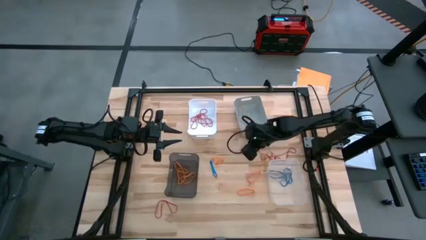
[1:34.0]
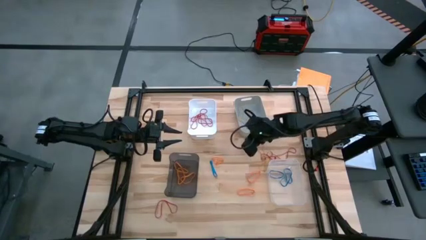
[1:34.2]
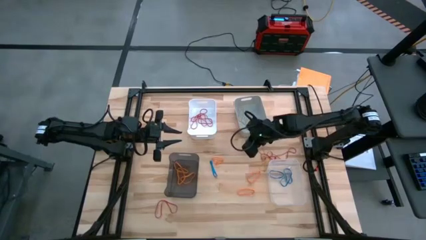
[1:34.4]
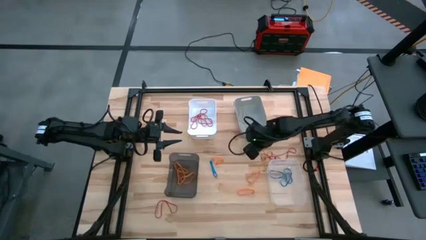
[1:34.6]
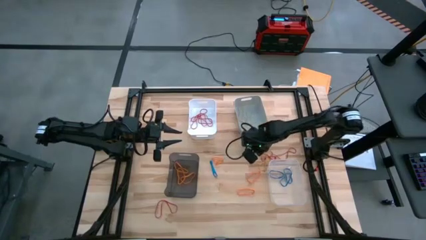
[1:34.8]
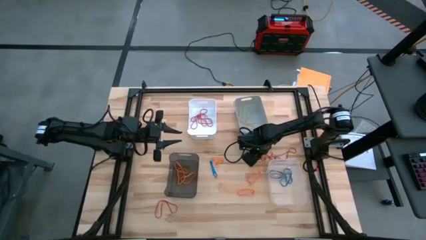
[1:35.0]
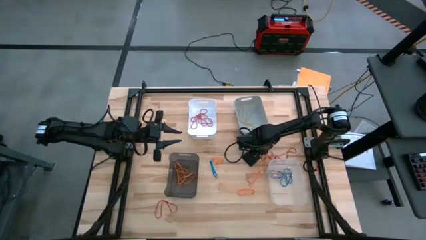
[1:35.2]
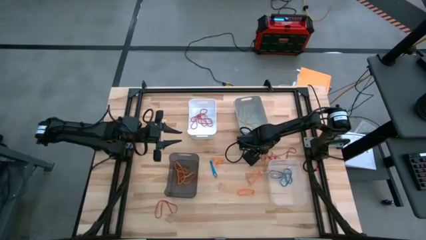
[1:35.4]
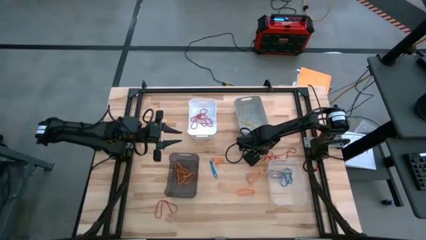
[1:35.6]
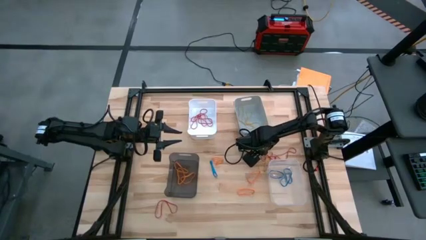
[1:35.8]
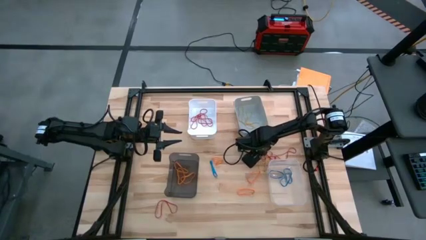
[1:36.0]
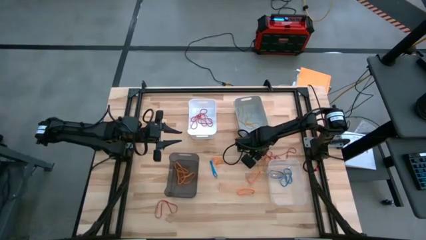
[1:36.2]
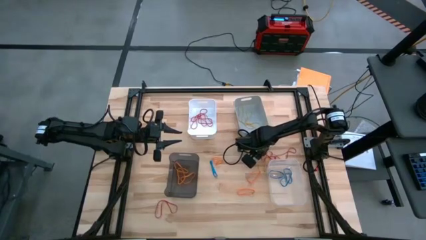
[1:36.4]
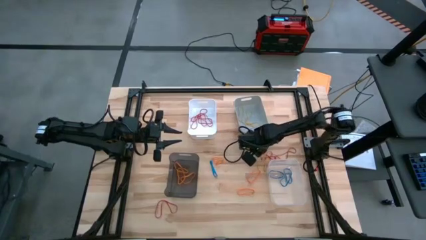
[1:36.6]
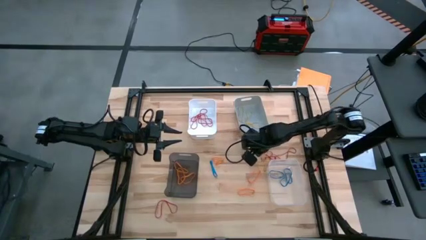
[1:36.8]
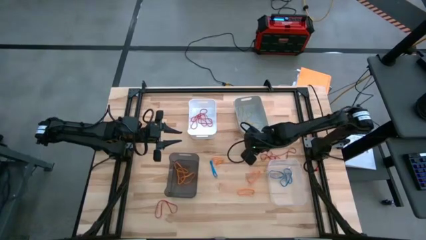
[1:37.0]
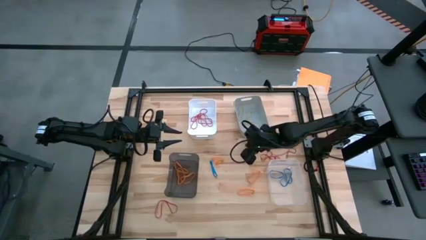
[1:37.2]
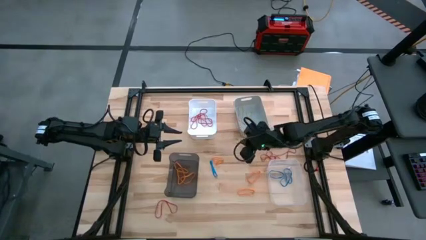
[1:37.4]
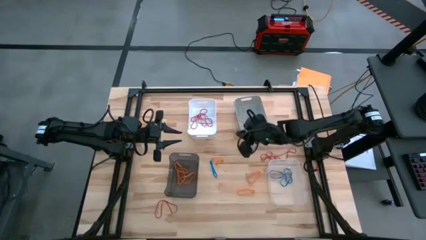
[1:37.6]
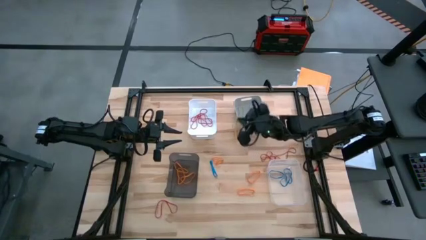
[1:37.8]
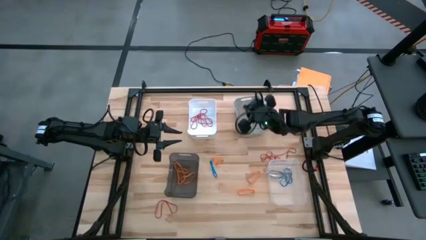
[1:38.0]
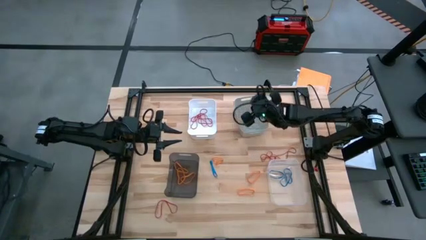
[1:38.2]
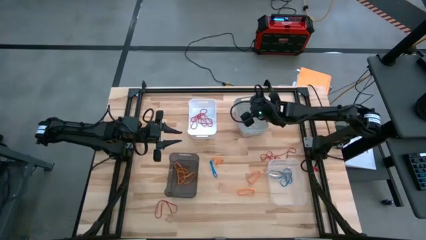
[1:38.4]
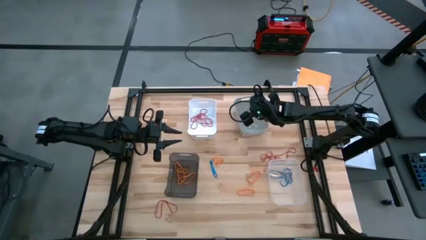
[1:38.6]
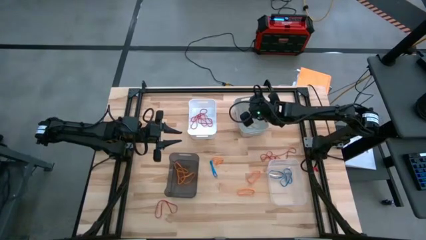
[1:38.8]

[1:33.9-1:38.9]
Task: Sort rubber bands into baskets
Put the yellow rubber band into the gray bin

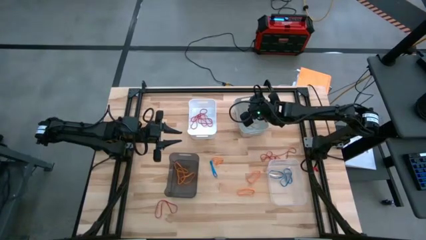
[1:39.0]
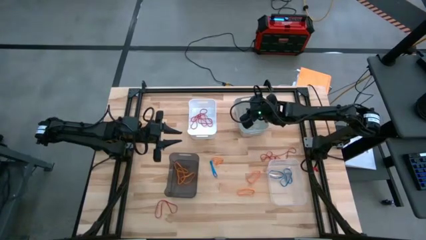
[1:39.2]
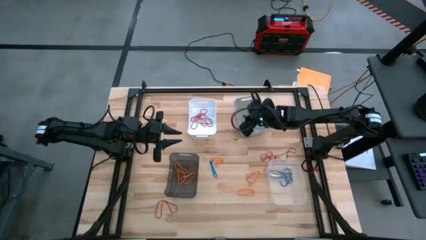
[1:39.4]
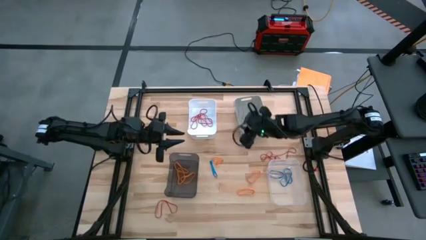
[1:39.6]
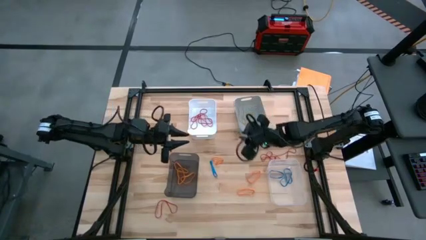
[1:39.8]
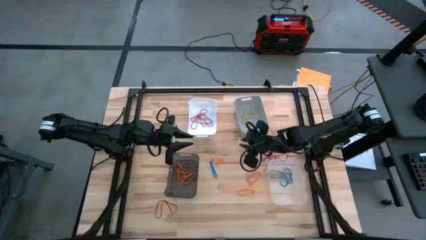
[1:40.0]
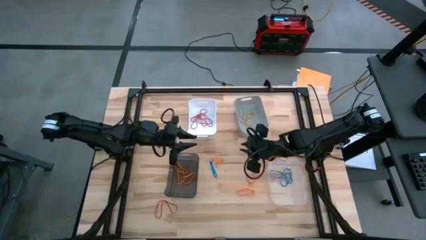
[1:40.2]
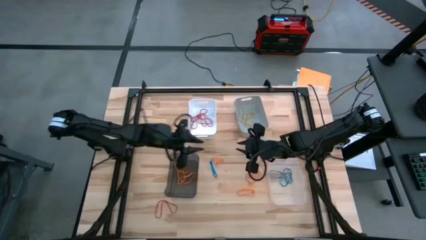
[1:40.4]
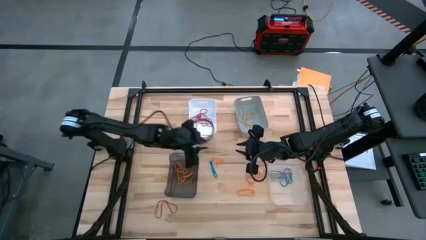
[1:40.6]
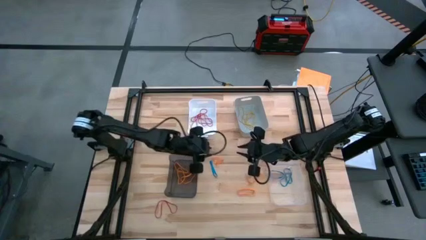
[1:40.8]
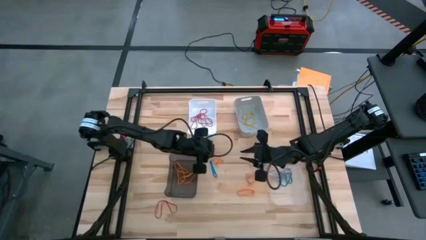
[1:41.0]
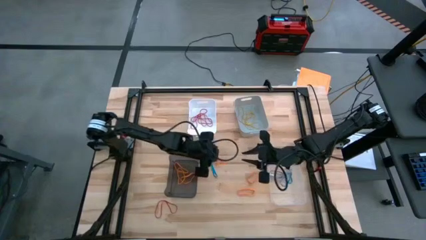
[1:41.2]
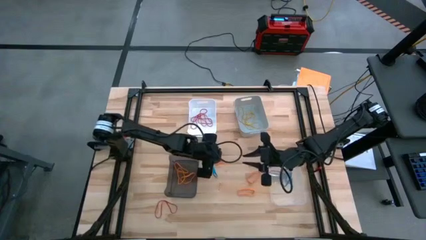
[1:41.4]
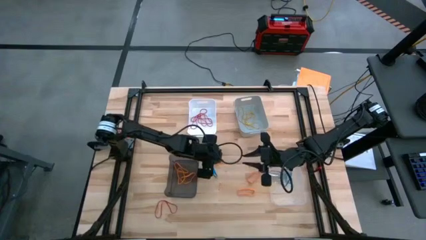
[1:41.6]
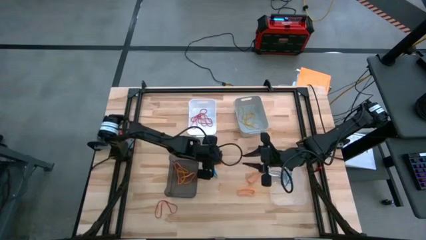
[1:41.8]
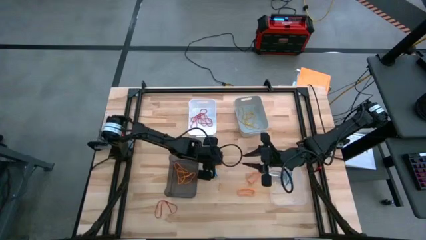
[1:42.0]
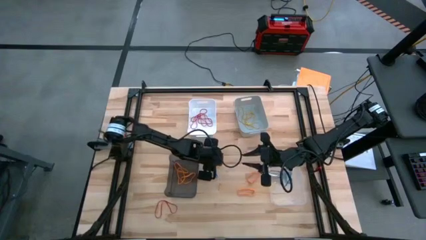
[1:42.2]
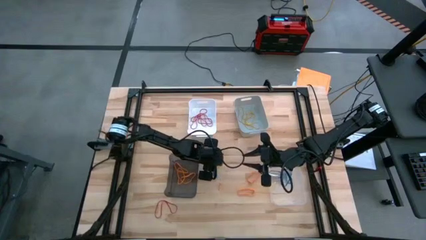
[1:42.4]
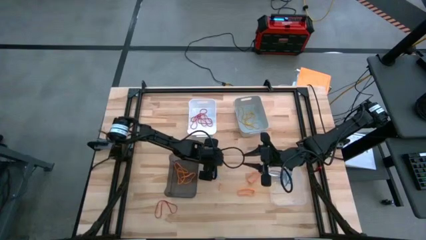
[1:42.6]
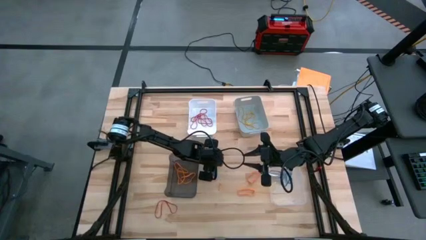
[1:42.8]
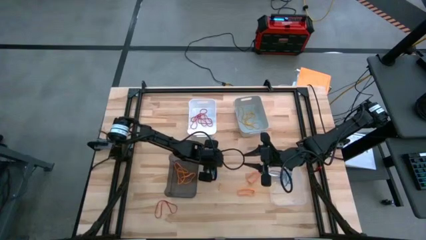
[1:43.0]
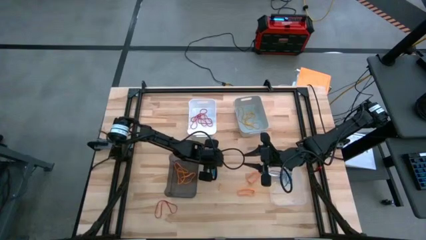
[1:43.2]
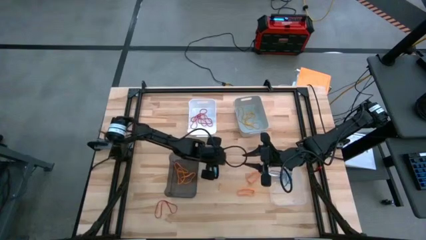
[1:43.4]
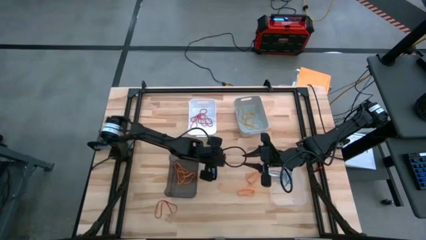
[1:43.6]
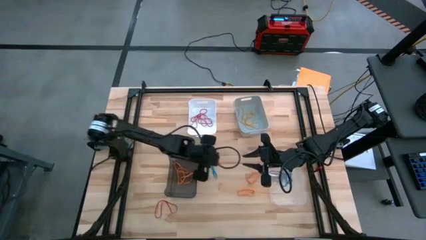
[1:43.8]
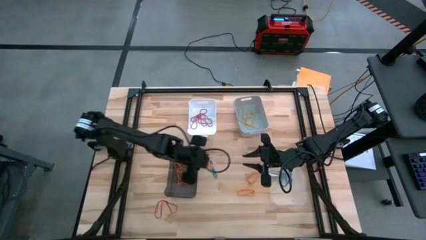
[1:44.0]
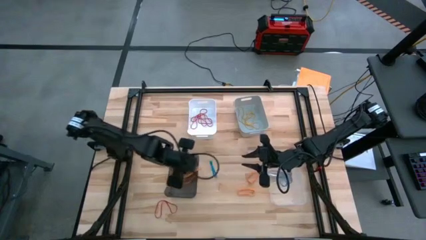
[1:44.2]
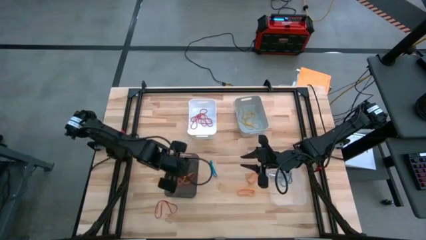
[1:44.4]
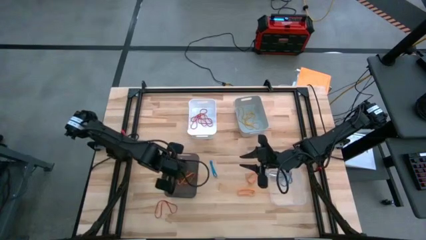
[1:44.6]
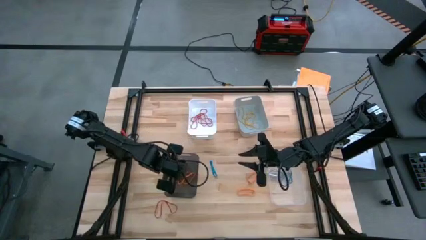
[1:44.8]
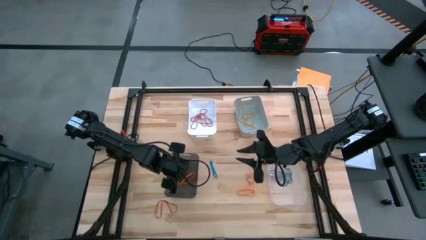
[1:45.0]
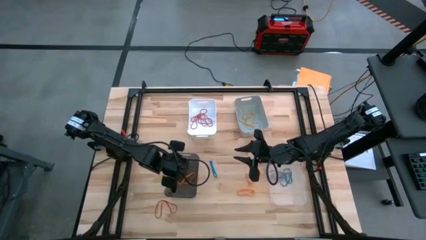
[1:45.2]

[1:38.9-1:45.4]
Put the orange rubber band into the black bin

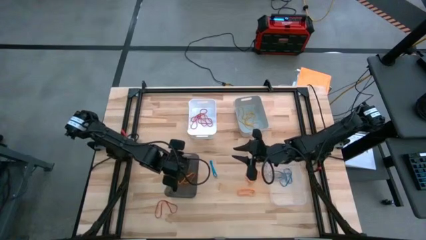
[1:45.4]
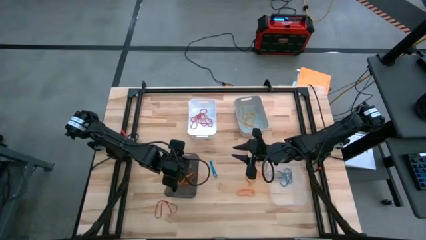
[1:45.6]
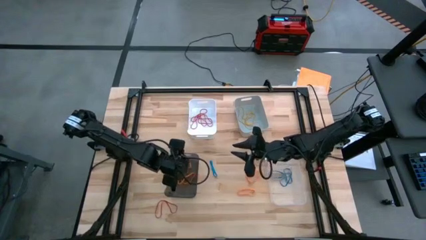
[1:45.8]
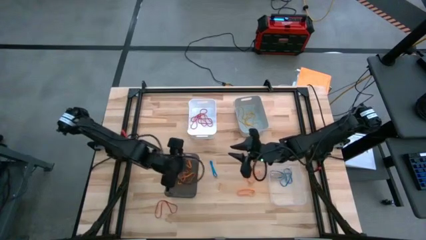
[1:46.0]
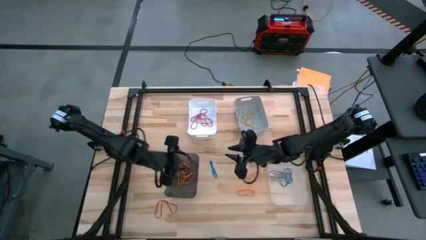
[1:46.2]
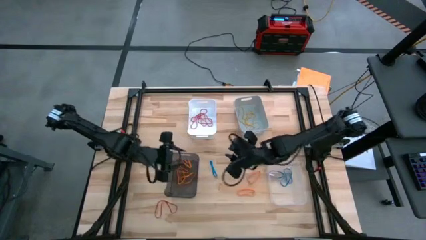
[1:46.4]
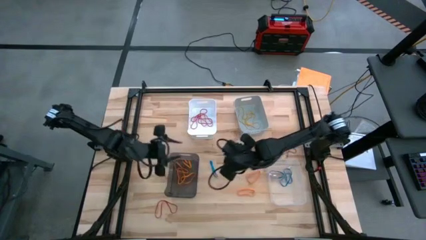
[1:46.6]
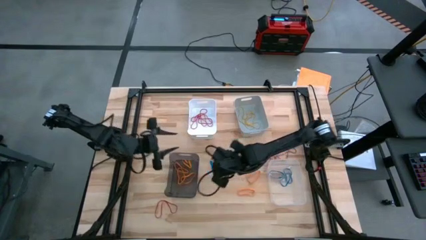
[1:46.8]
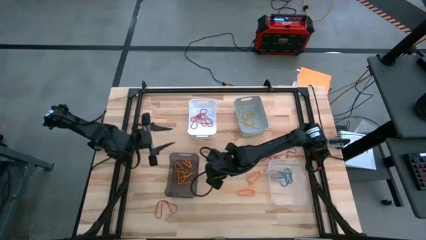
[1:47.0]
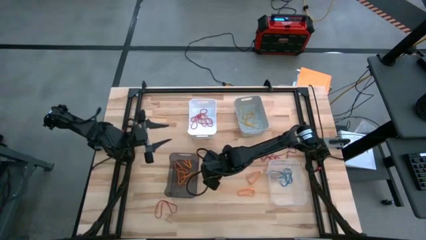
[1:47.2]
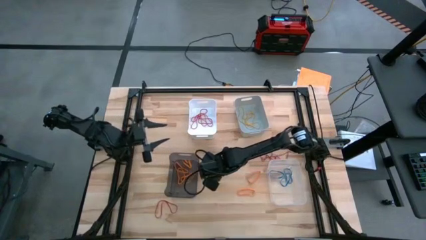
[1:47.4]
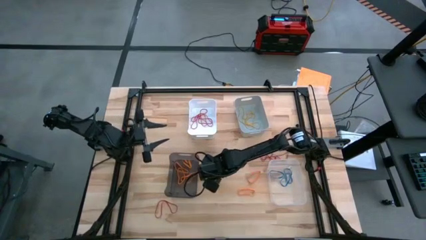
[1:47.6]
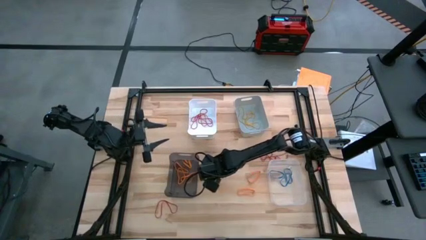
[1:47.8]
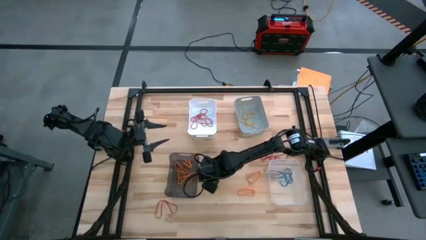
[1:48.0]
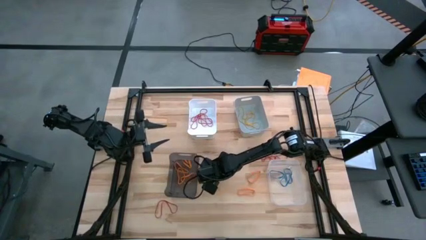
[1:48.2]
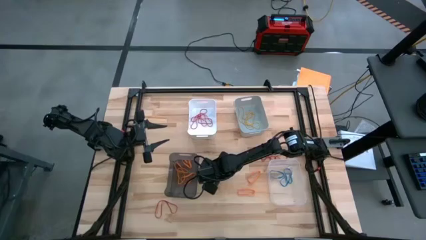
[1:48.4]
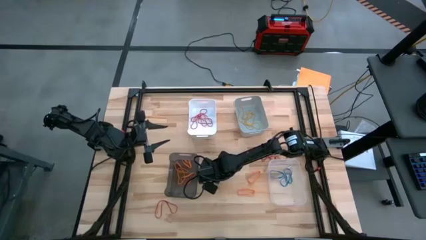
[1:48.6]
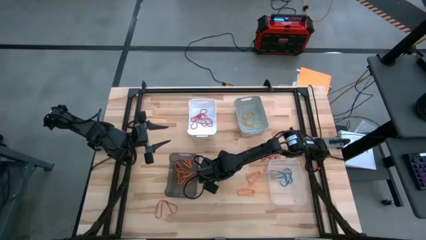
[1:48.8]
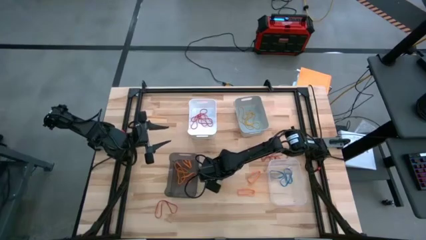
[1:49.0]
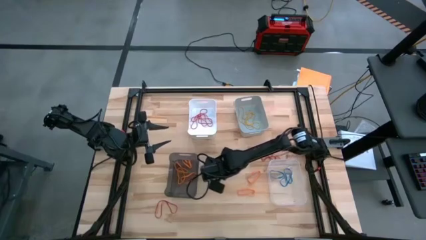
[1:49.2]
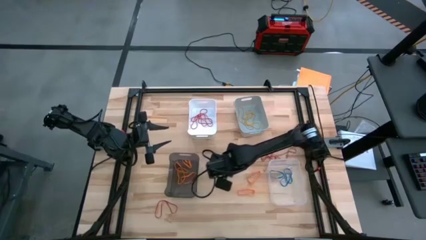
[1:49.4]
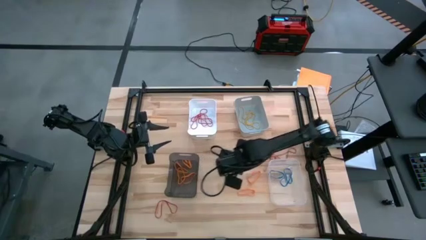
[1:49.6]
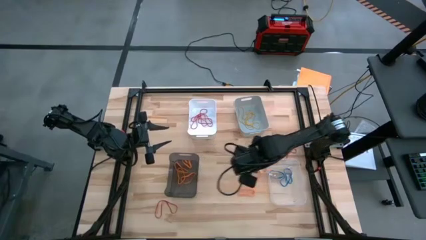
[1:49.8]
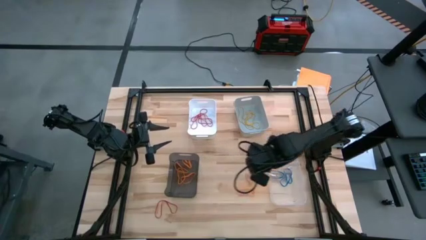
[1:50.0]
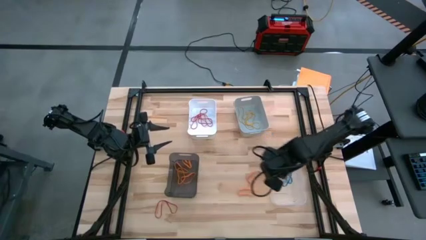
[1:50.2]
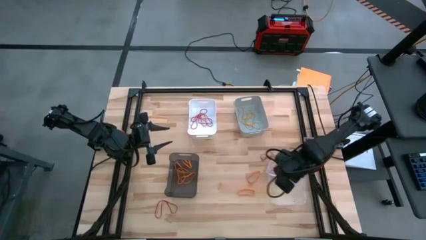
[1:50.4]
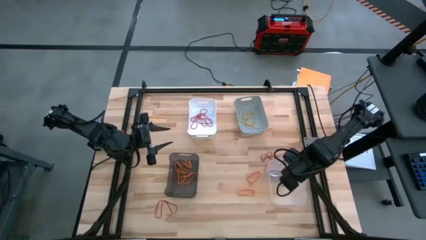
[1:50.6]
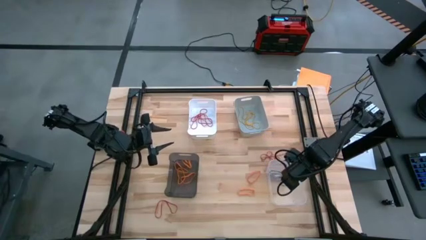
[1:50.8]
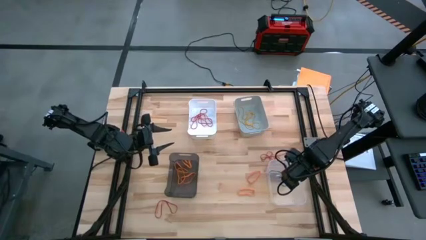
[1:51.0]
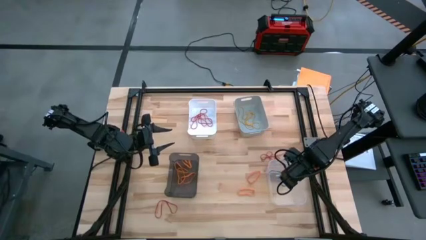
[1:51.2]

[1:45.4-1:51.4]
Put the blue rubber band into the transparent bin
